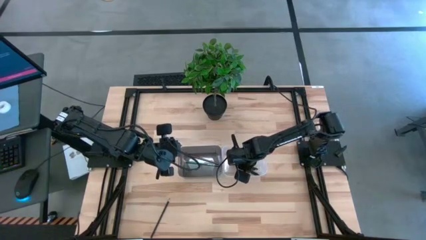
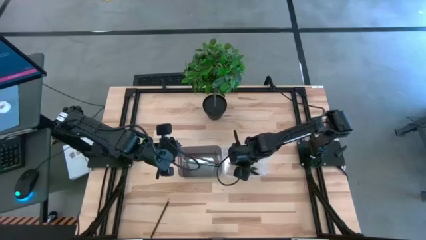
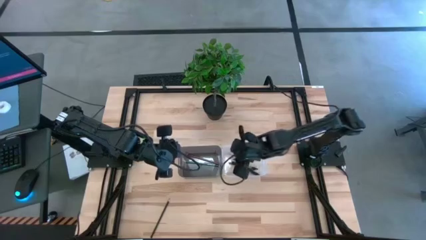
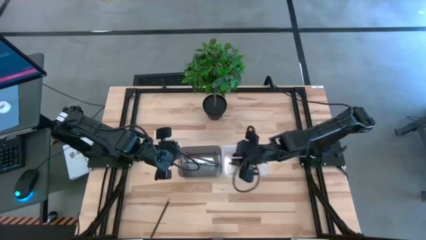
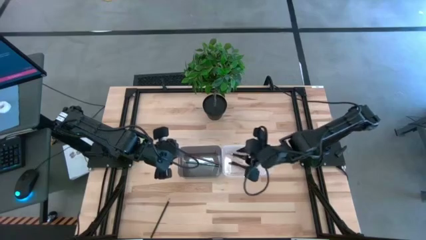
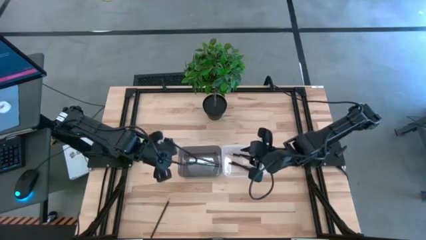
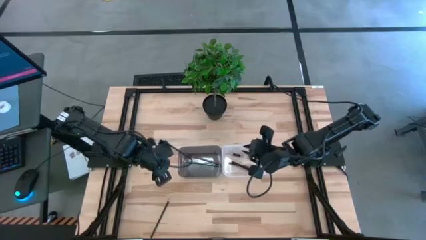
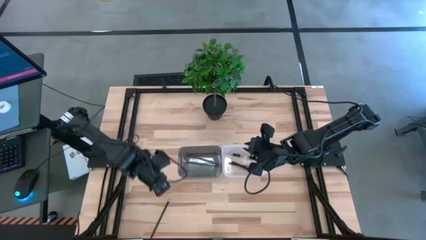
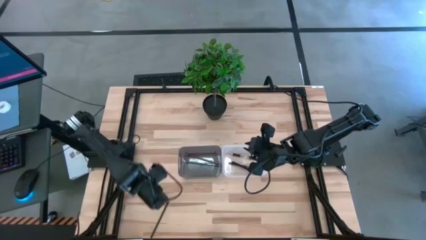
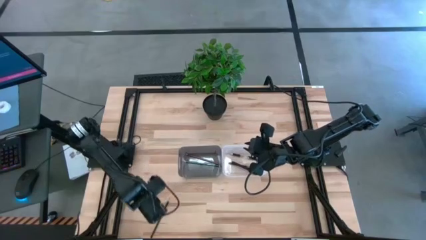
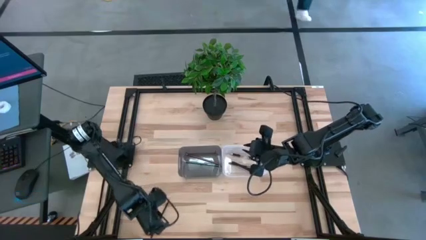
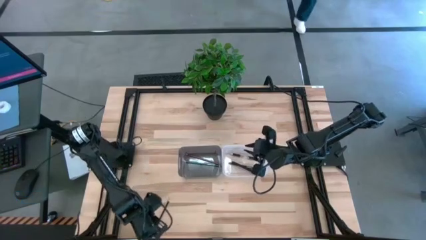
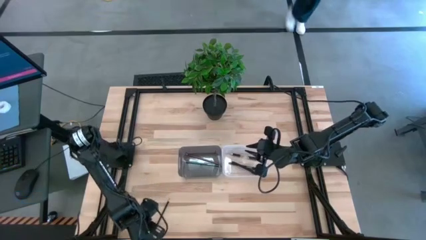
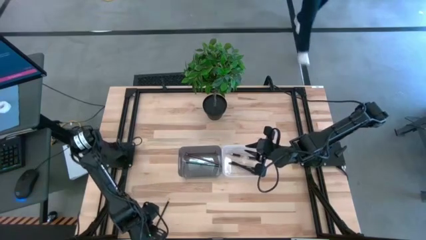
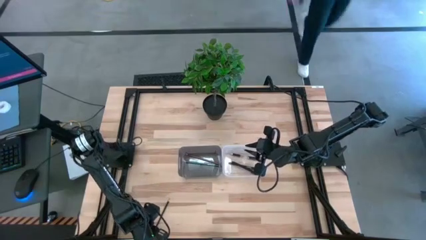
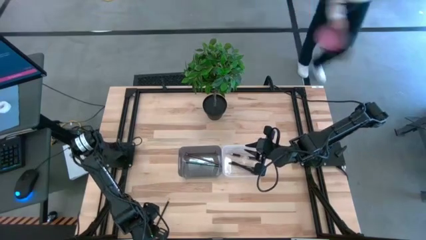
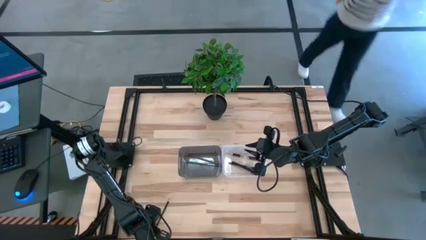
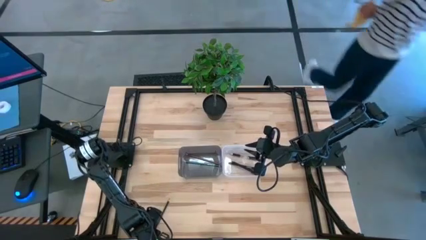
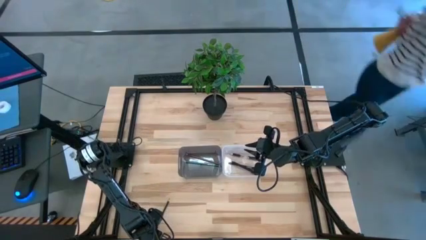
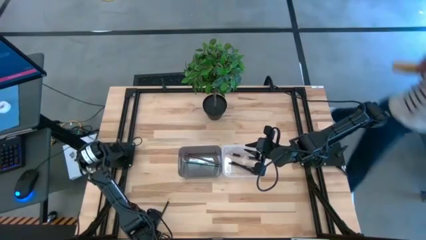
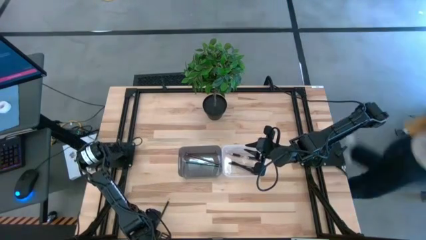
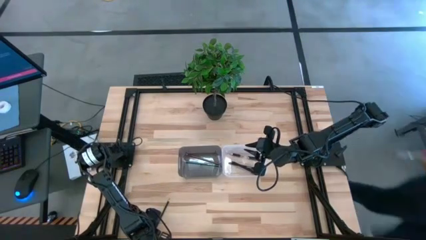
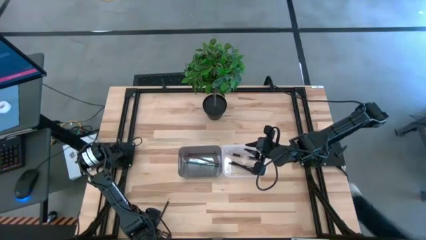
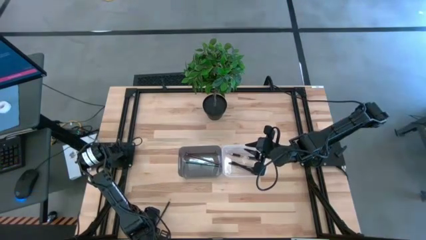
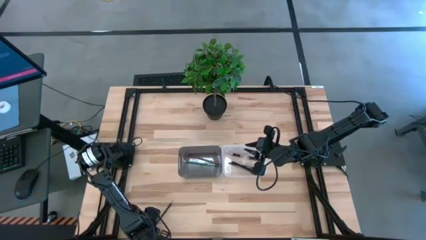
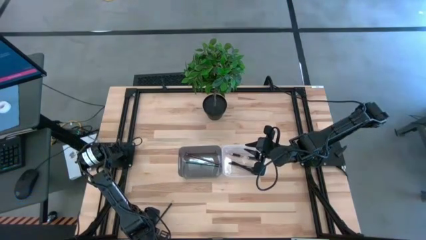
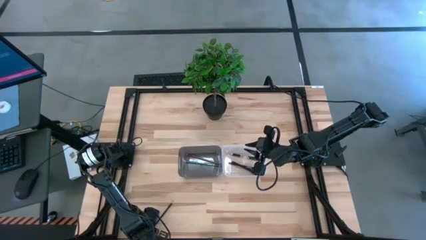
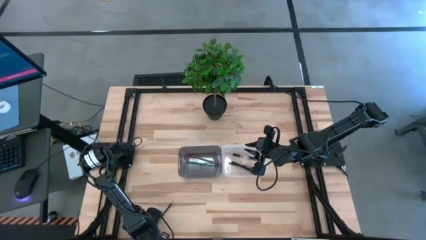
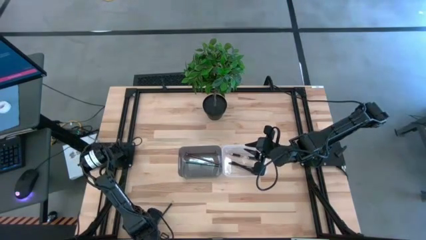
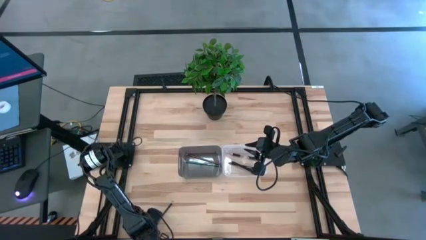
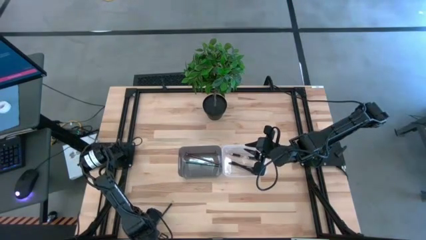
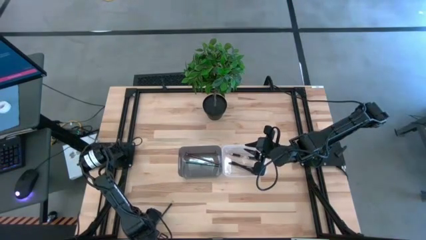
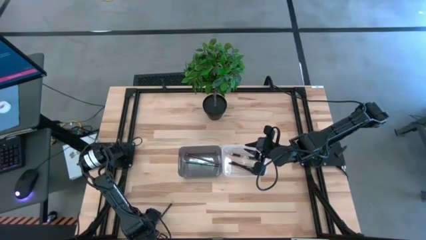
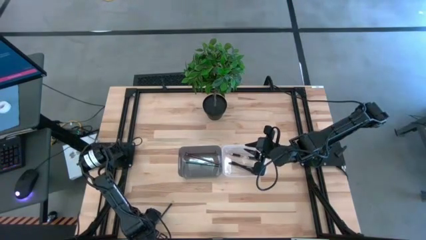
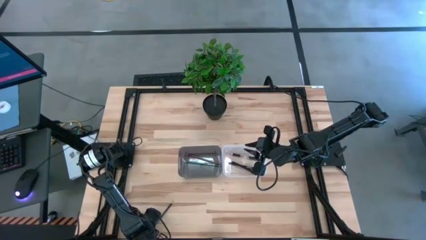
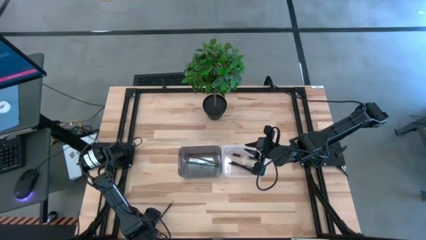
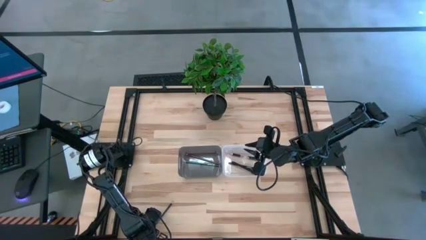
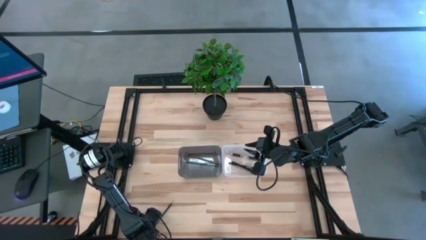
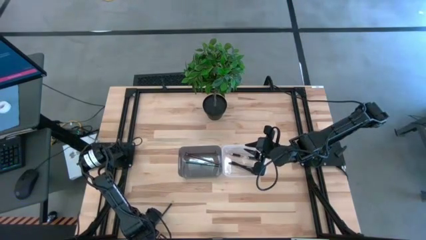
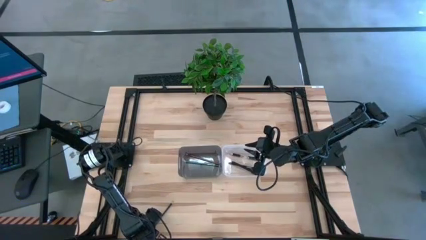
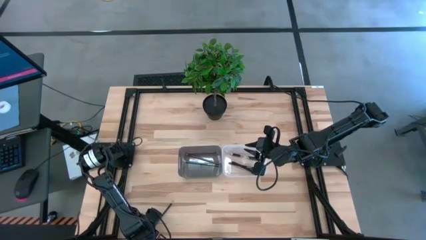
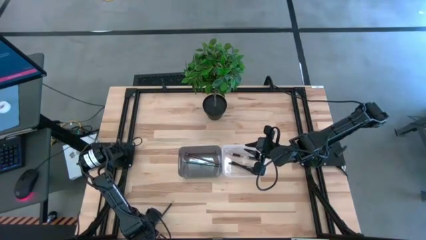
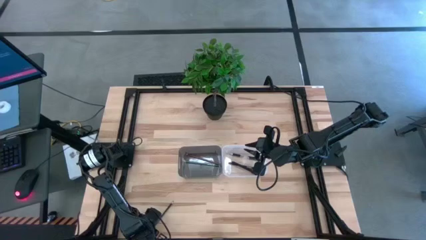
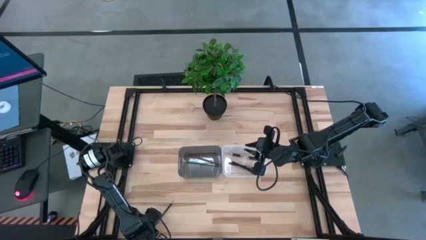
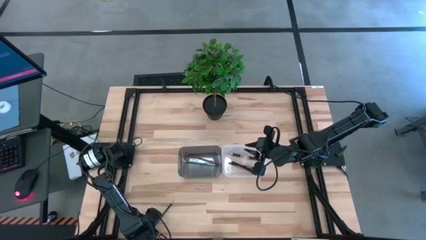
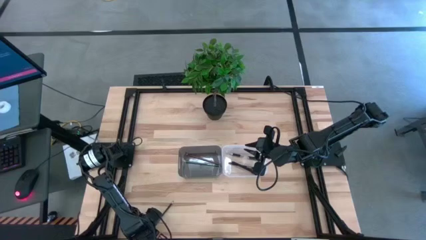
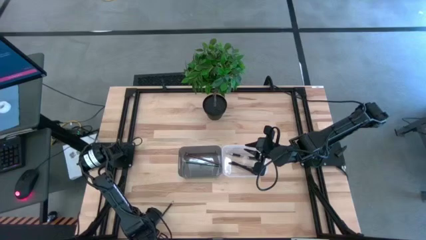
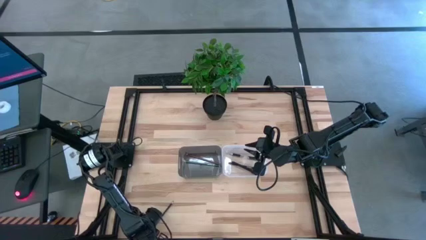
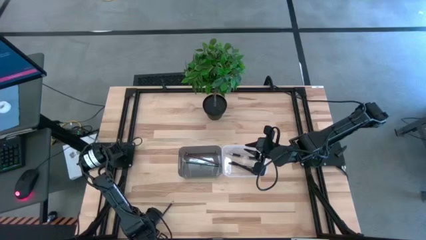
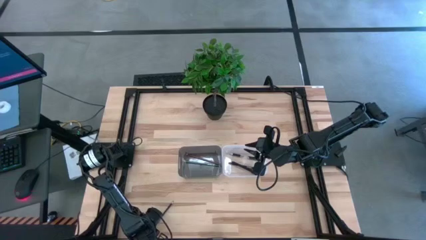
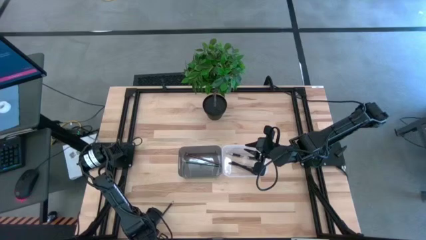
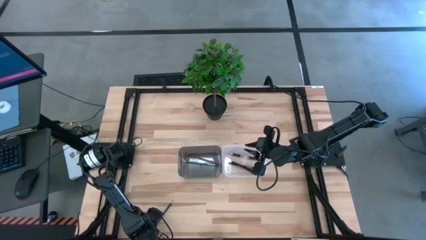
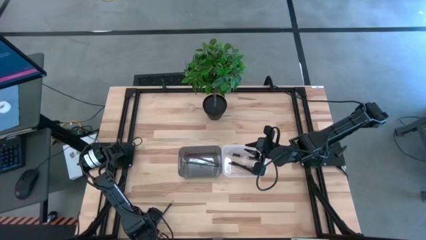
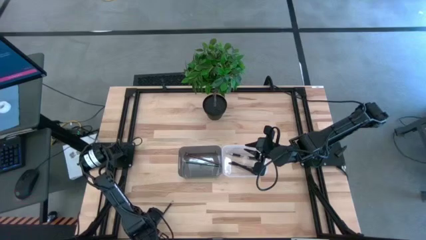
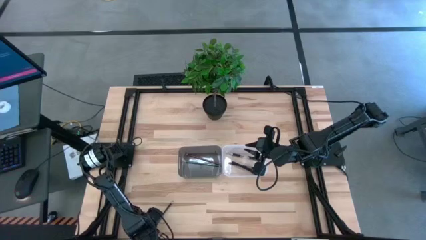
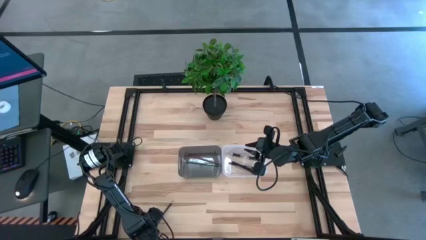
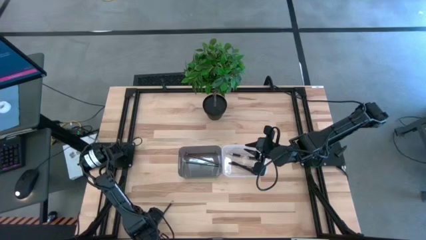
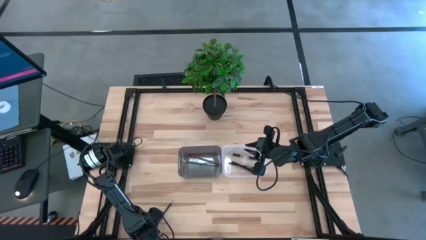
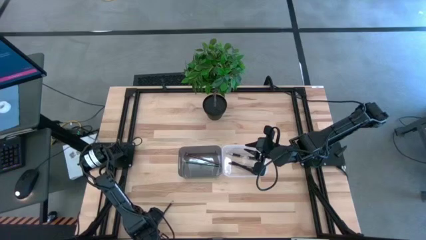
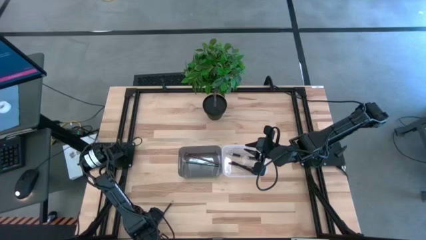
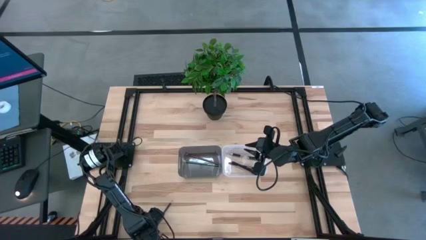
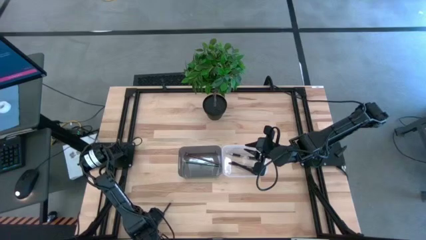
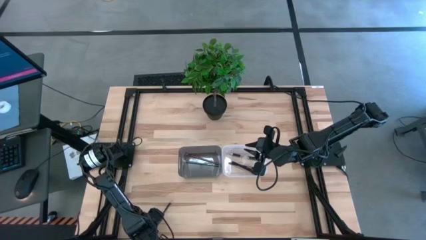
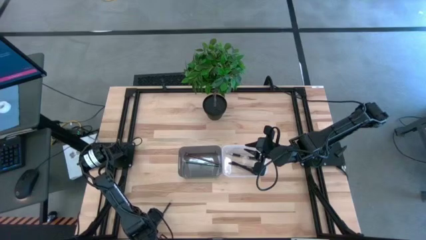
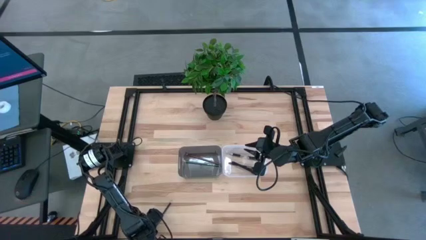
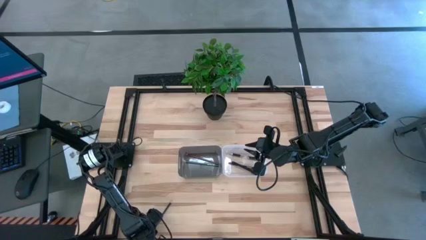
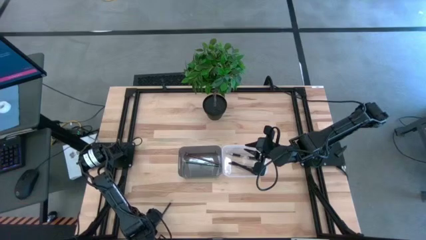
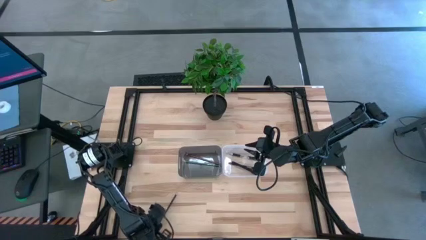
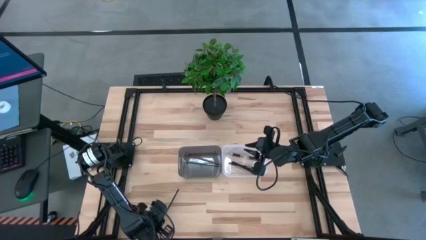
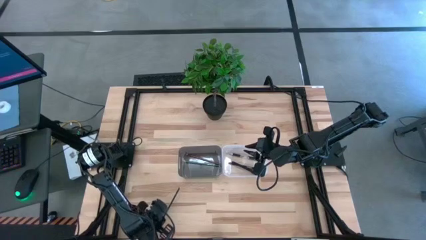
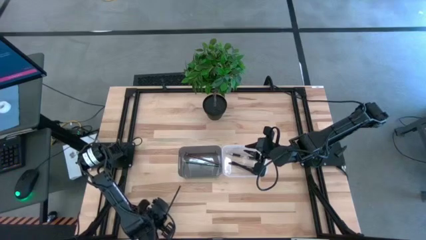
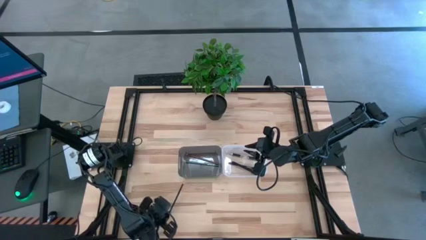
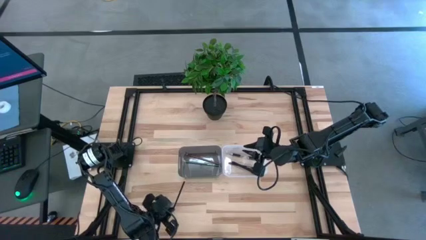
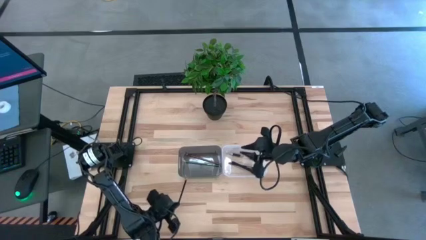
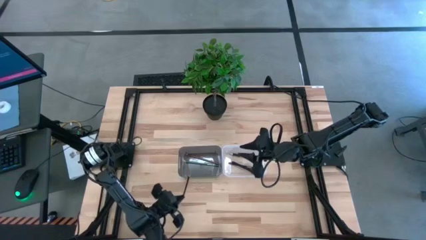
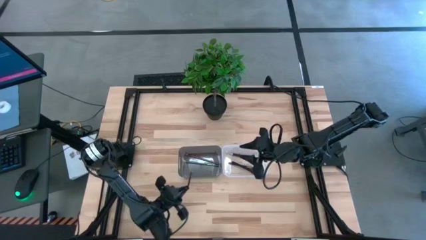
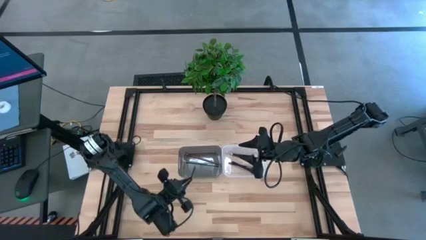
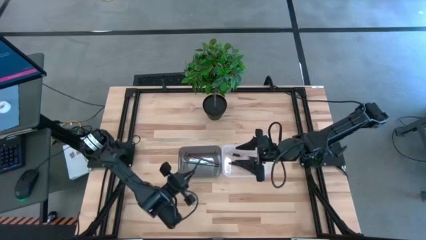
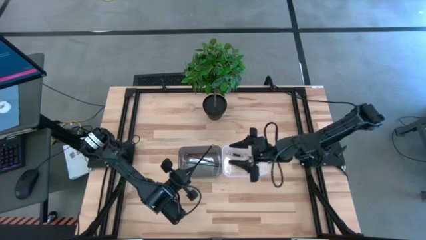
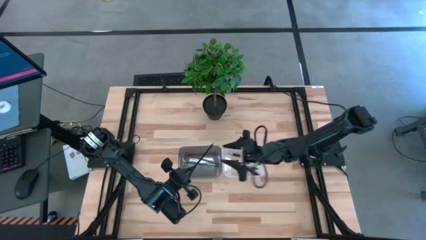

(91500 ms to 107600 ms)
Task: Sort pens & pencils
Put the black pencil into the black bin
